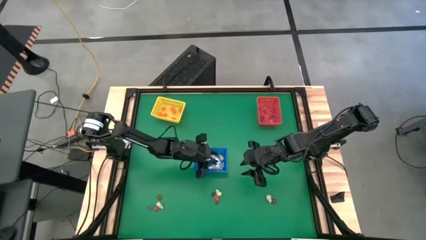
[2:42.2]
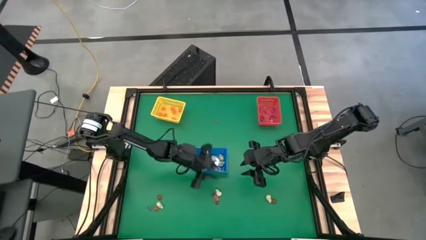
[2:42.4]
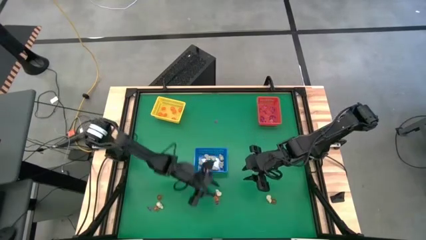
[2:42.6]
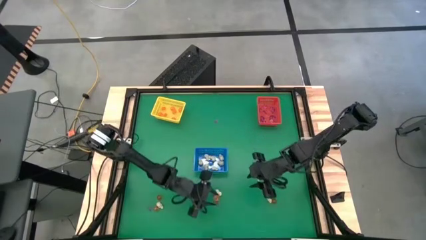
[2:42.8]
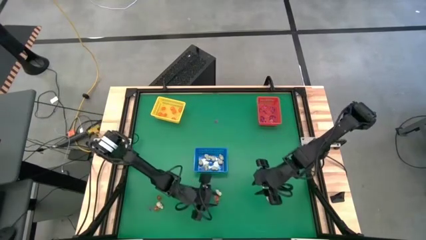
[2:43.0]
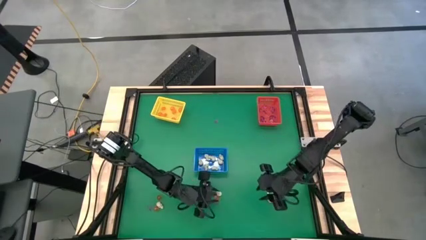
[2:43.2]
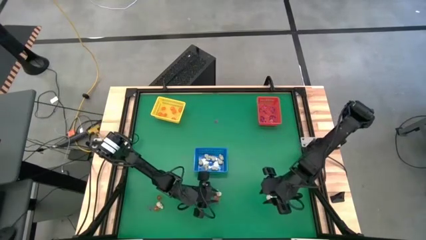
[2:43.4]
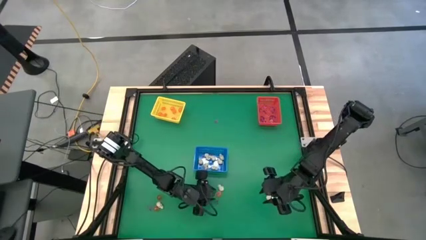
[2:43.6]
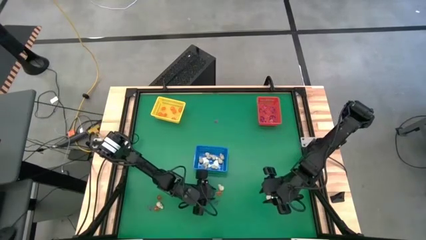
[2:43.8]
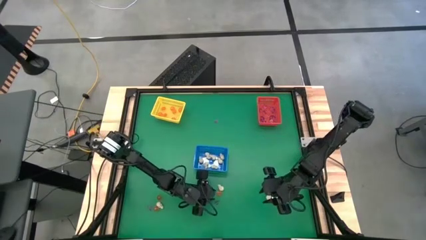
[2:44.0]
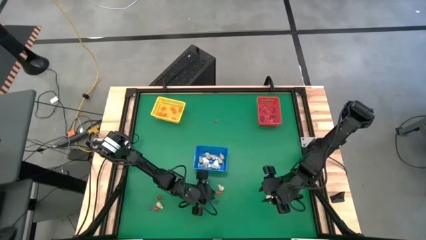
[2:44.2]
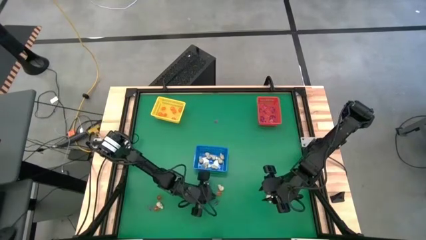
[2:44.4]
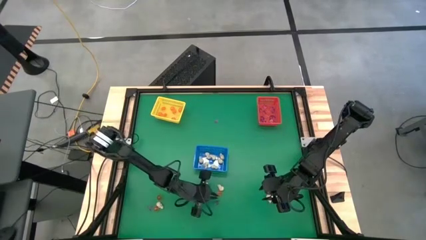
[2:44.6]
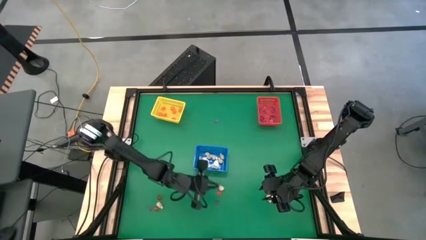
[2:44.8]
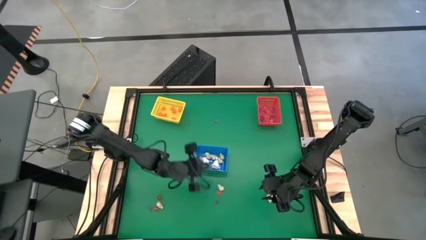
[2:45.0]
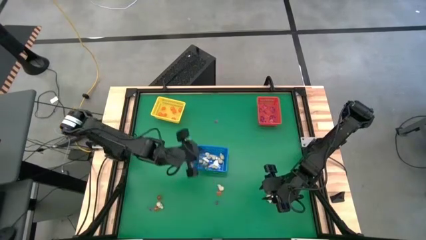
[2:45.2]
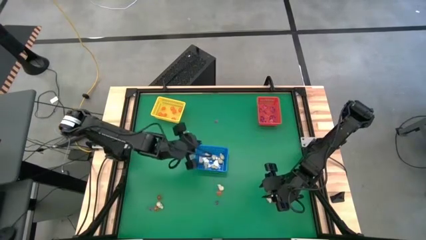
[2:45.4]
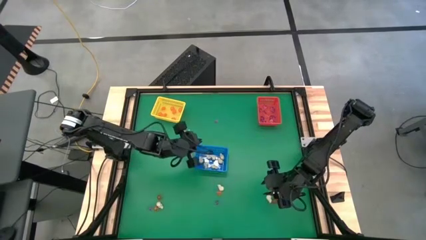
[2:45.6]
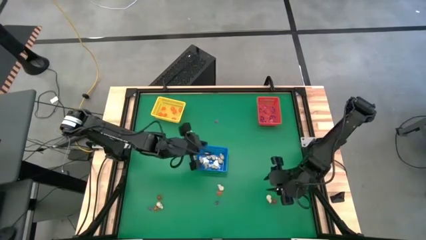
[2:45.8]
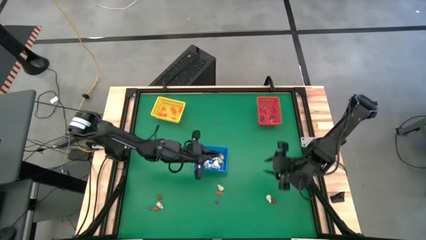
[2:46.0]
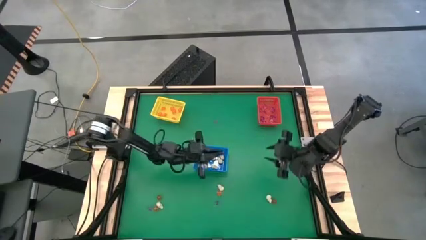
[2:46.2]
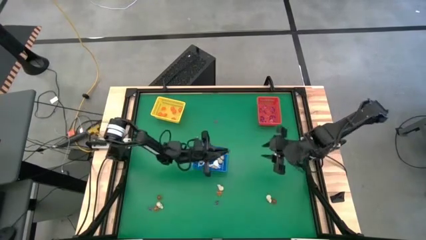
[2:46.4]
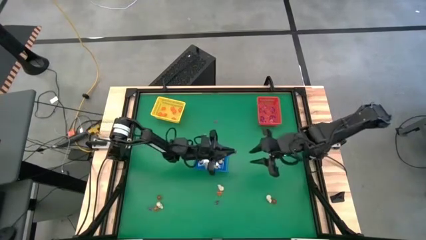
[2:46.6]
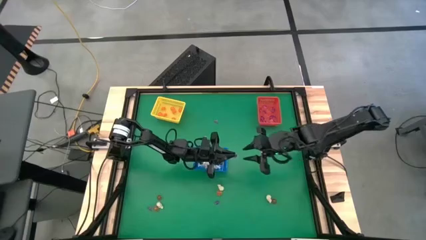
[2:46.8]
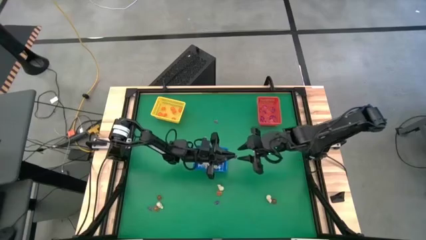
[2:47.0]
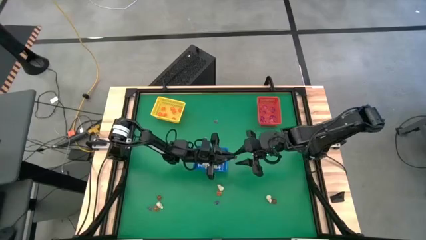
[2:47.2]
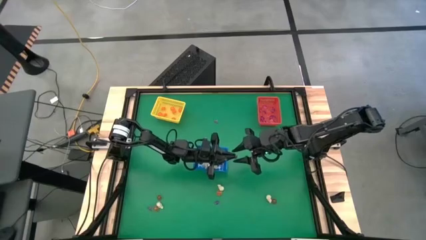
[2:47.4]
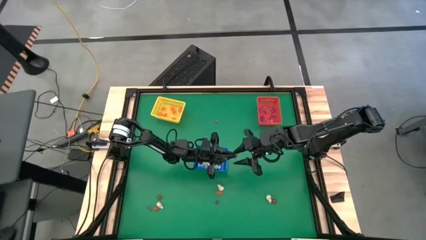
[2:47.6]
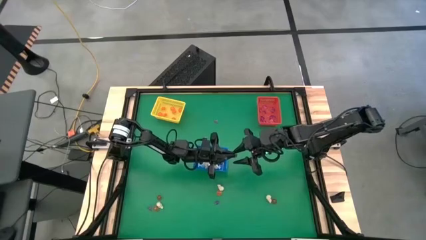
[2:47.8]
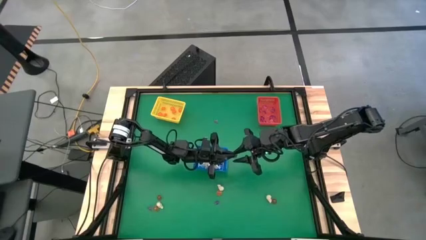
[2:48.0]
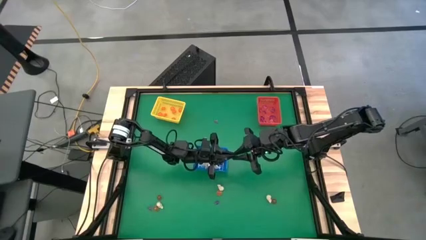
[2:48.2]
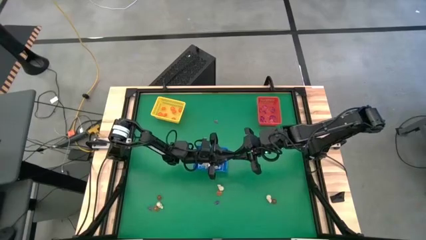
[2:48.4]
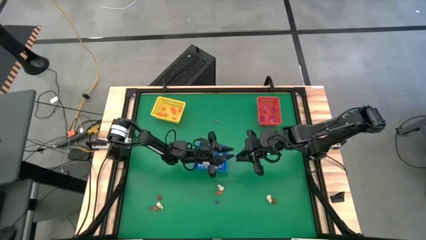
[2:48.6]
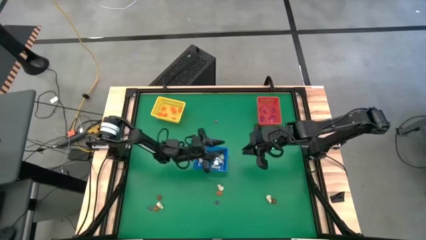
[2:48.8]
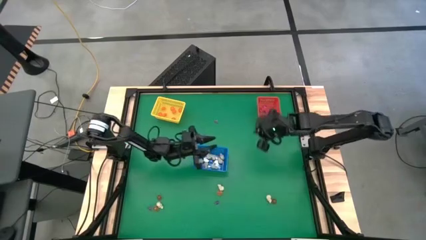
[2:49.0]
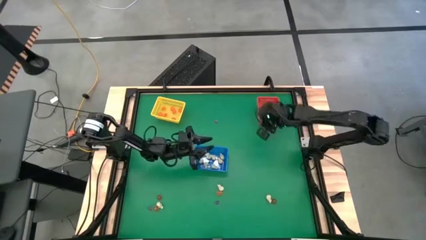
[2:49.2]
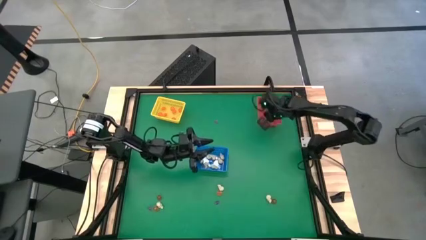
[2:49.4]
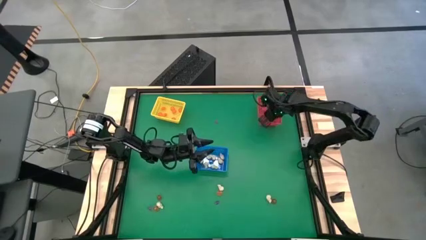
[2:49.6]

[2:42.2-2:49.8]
Task: Sort Halloween decoration
Put the purple witch hat toy into the red bin

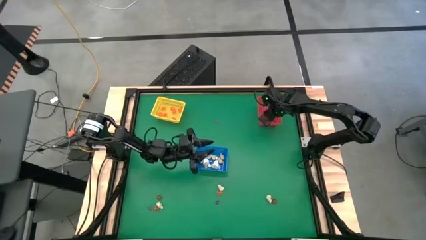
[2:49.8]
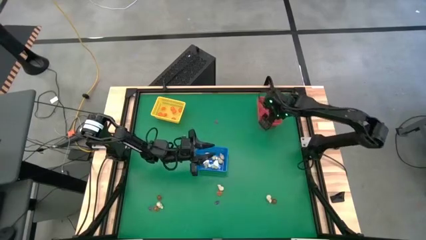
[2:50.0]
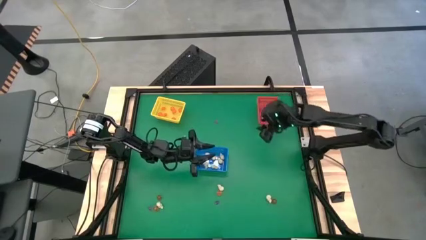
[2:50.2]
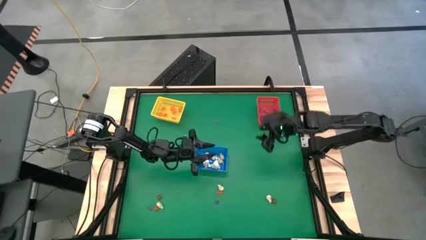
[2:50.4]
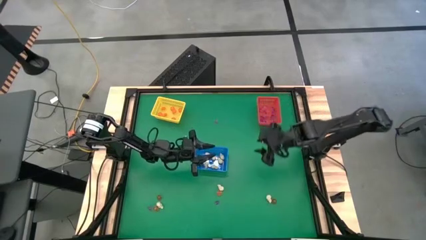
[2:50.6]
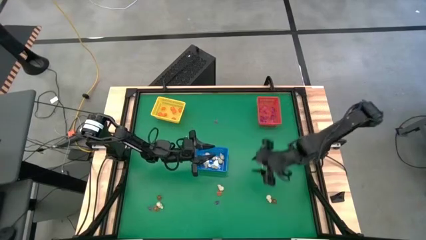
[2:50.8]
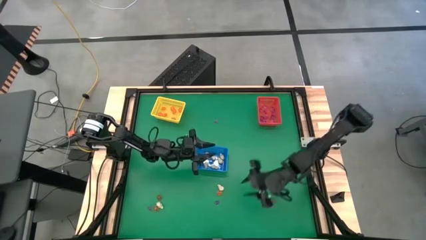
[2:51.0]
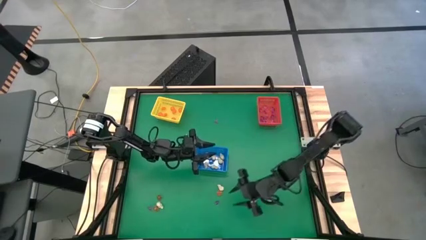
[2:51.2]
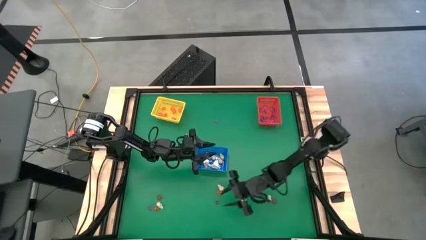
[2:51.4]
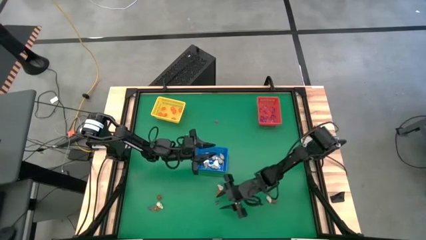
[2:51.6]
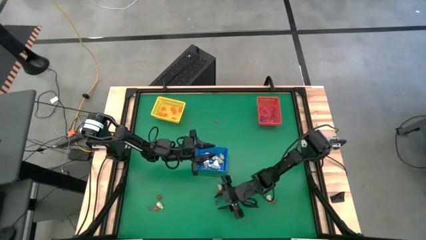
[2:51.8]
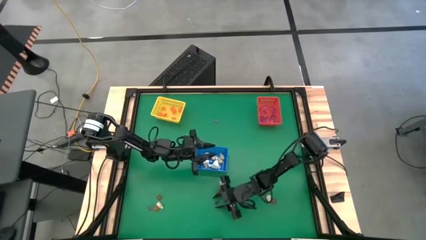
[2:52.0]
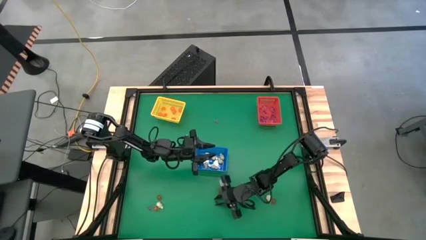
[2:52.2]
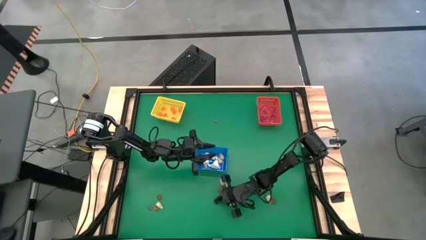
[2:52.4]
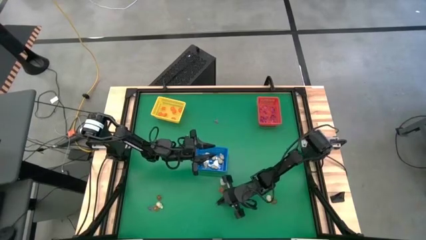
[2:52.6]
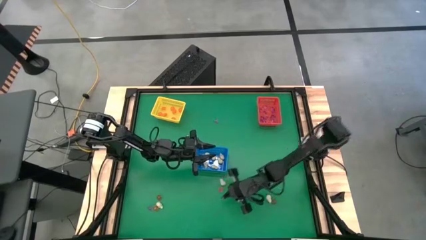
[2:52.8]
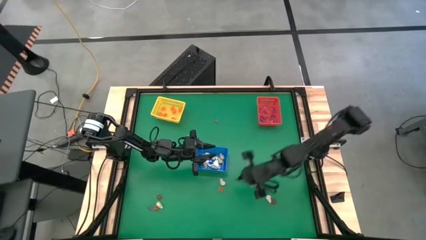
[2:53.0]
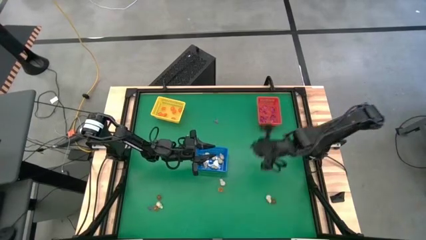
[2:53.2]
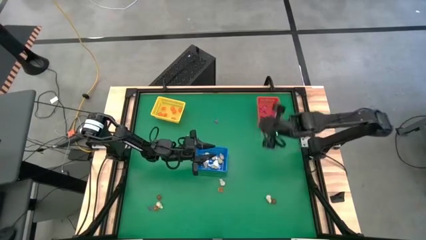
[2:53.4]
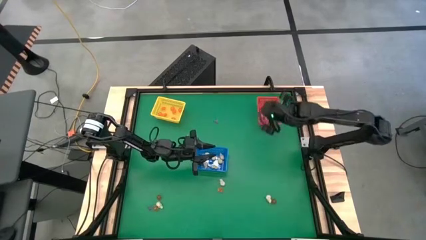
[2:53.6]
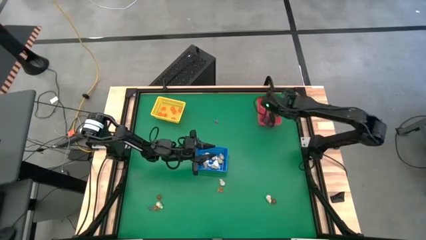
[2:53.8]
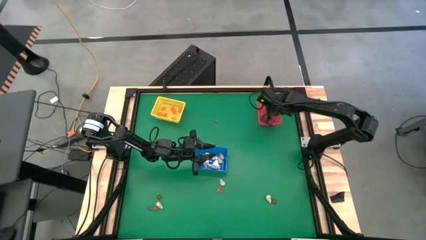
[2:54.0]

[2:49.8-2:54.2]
Put the purple witch hat toy into the red bin

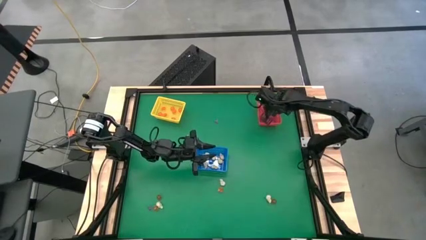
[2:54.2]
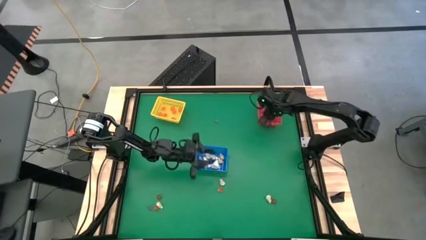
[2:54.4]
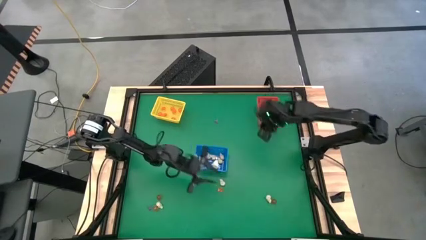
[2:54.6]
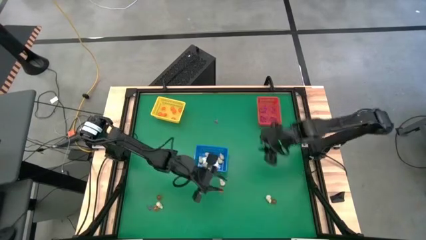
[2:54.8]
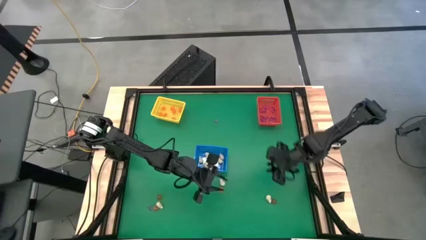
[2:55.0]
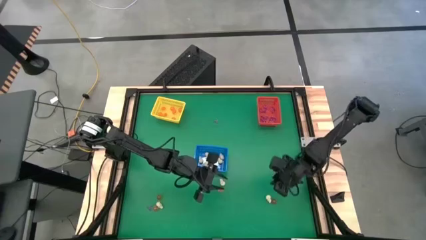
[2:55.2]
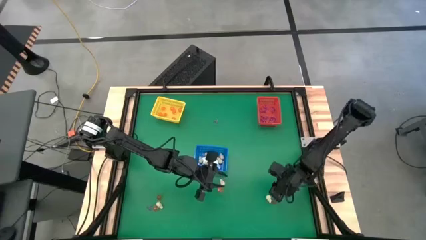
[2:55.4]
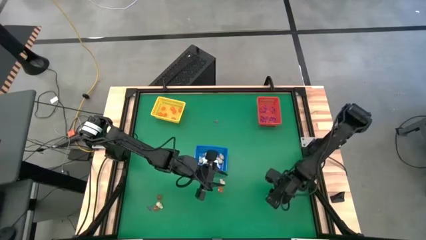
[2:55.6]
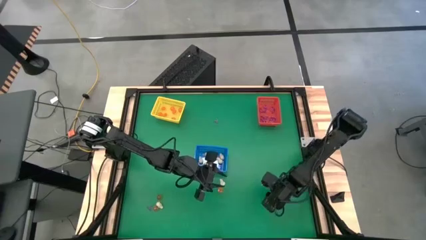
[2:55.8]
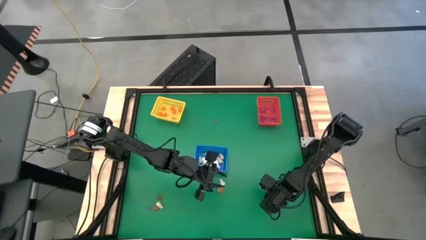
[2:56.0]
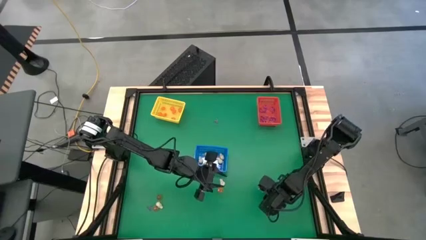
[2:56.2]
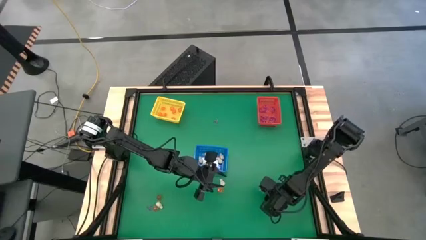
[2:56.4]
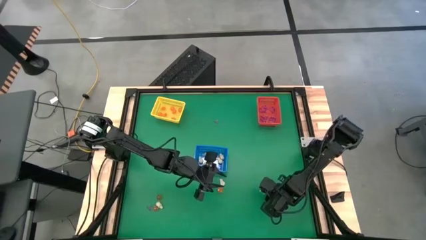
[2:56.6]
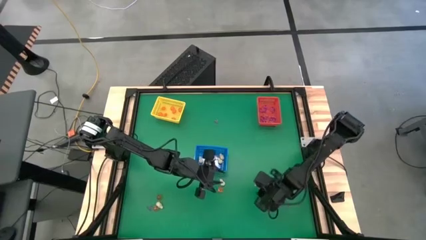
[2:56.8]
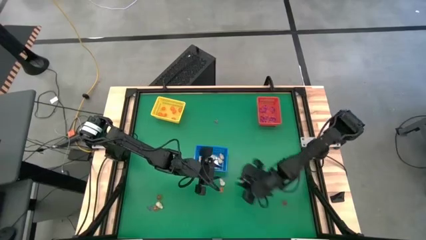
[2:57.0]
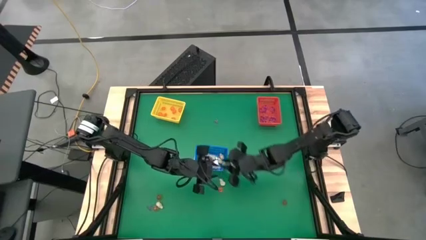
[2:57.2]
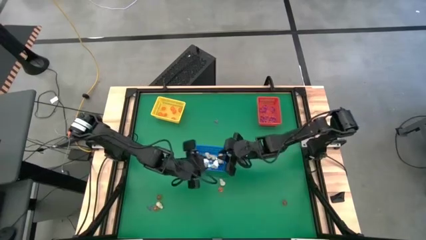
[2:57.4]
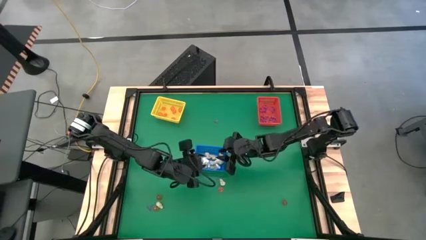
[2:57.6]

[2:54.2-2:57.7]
Put the white skull toy into the blue bin
